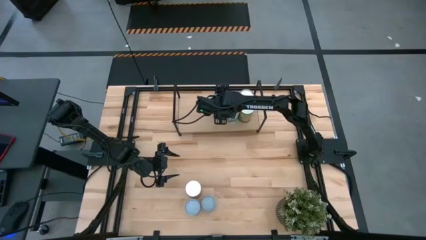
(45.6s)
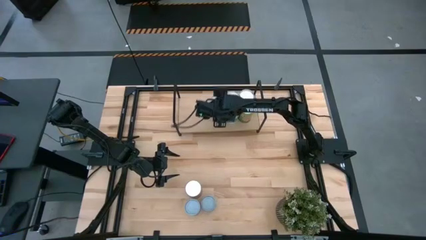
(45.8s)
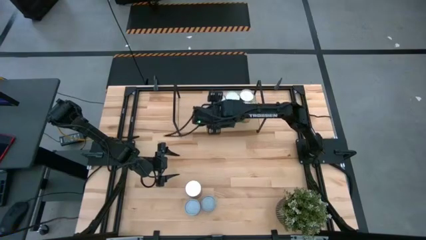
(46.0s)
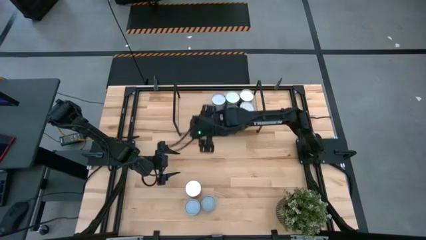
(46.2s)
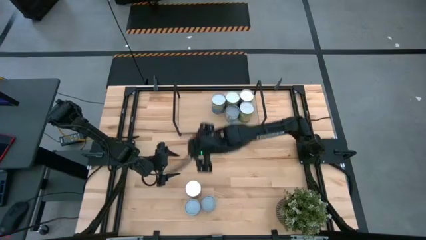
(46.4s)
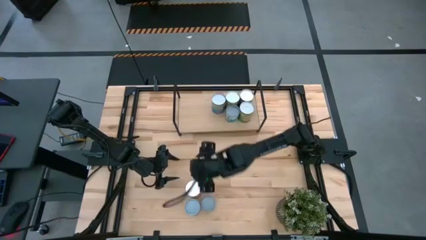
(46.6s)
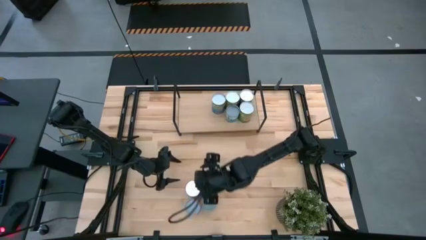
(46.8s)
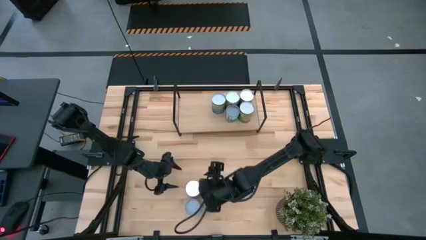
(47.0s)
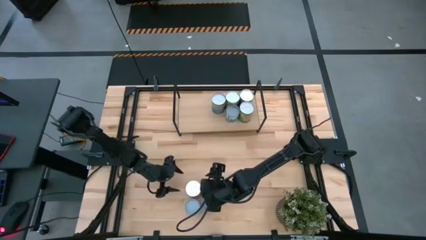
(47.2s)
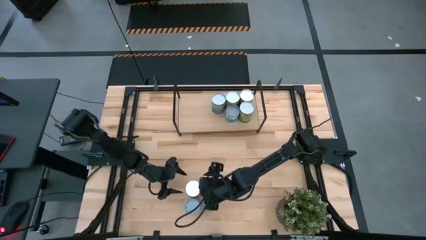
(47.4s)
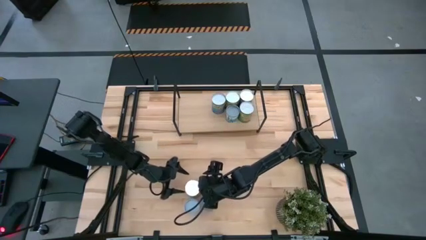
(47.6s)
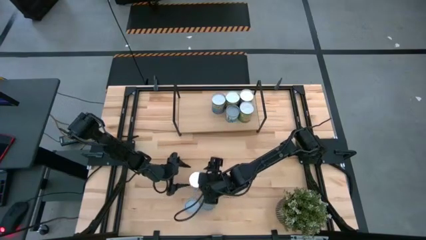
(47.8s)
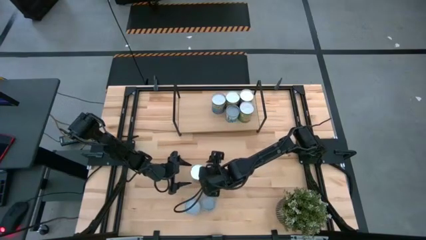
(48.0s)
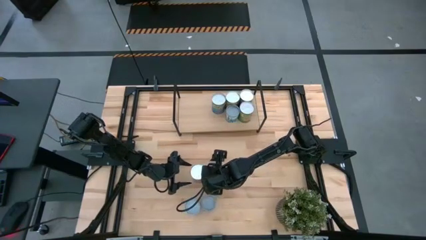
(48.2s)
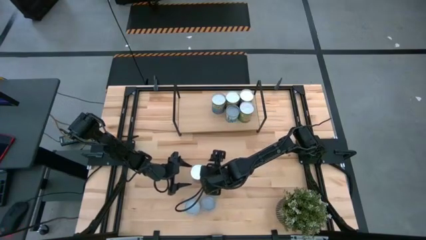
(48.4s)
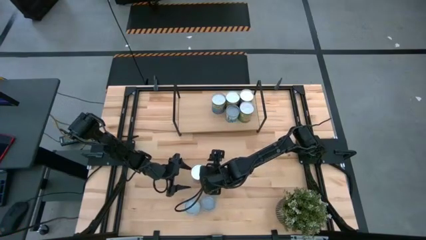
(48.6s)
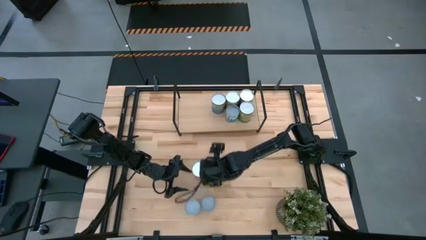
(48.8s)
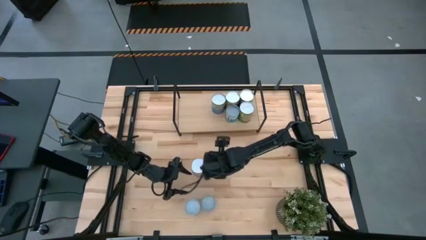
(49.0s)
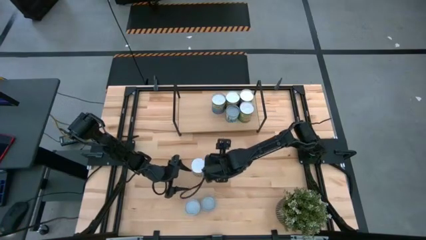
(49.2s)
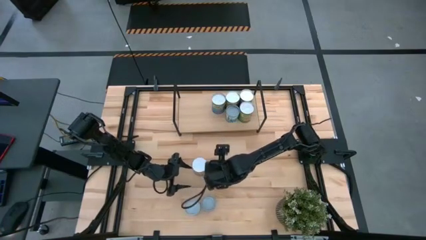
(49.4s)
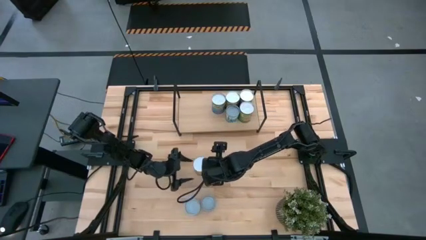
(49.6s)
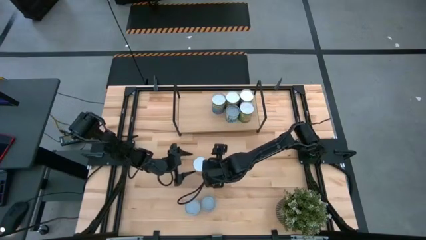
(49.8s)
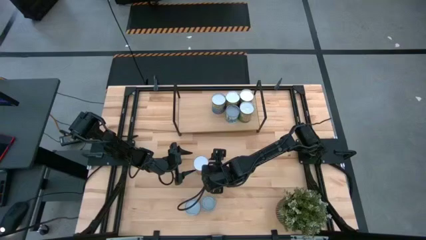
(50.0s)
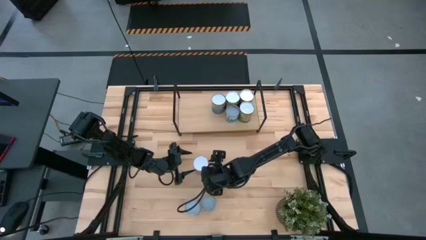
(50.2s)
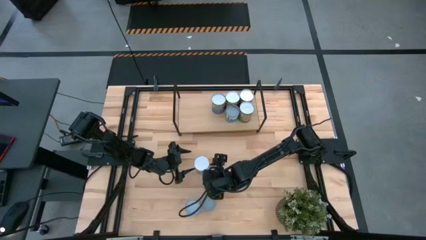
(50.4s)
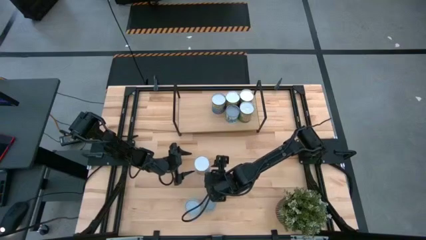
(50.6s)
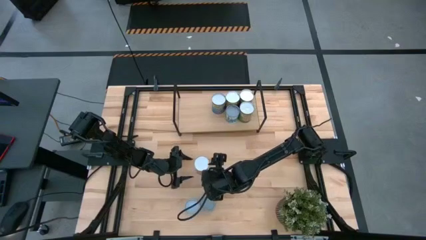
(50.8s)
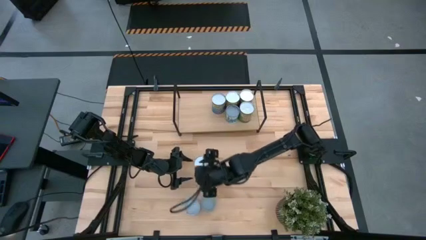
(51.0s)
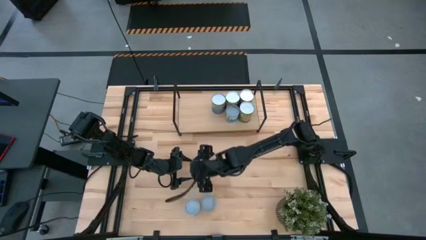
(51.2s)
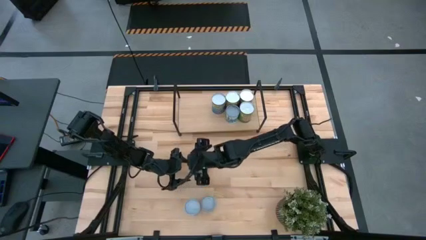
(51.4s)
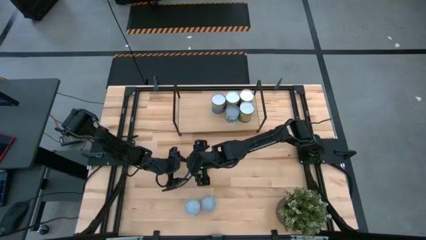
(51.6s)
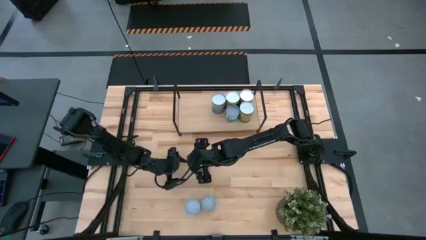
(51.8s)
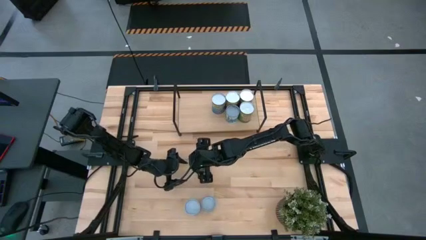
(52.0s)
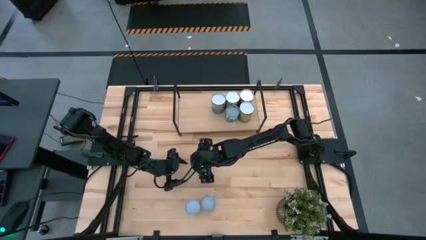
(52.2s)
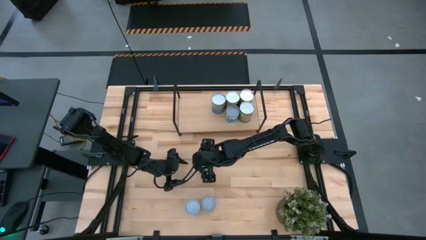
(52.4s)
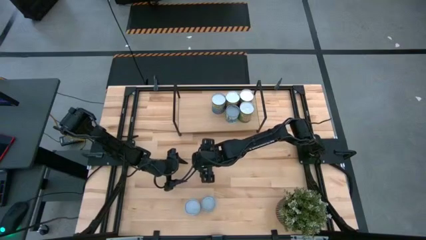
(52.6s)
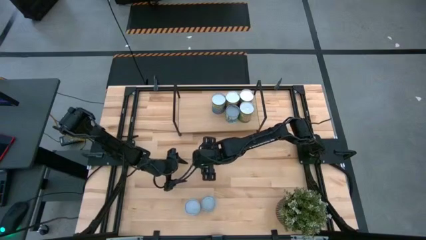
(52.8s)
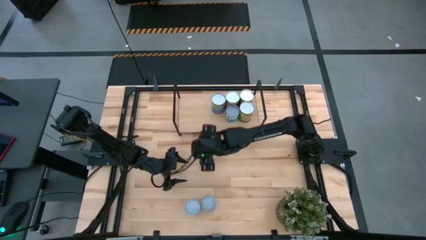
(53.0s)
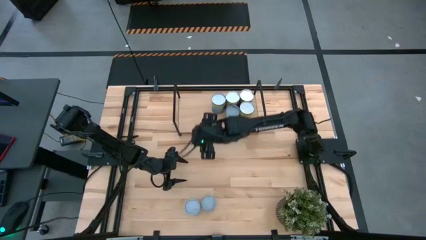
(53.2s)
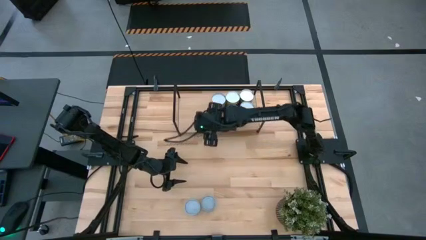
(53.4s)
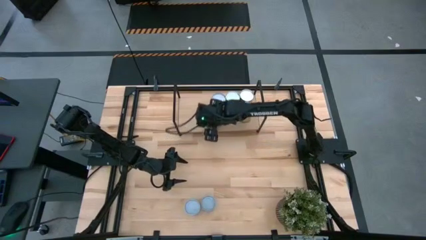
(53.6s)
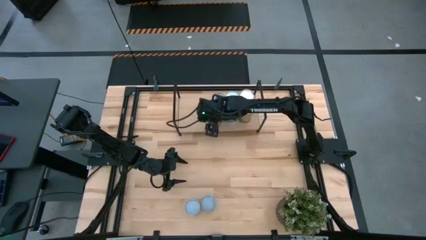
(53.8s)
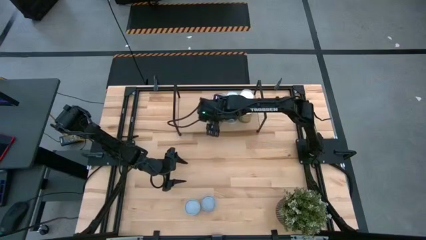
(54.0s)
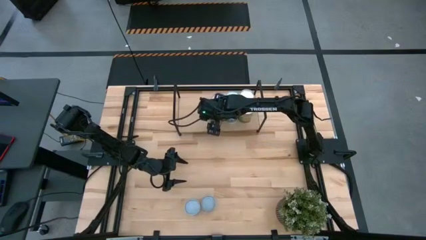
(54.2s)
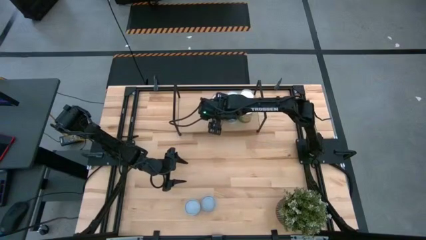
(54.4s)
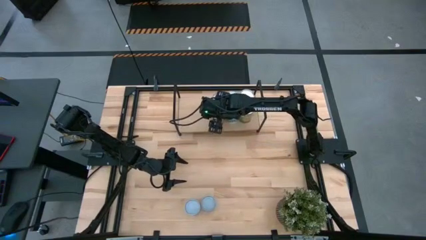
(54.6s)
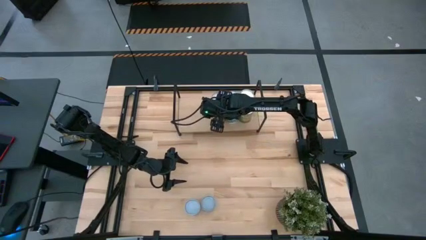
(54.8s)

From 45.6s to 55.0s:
Task: Pick and place cans onto a shelf
Put the canned pineapple on the shelf

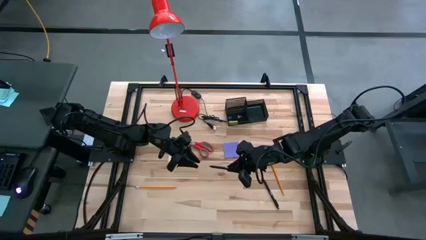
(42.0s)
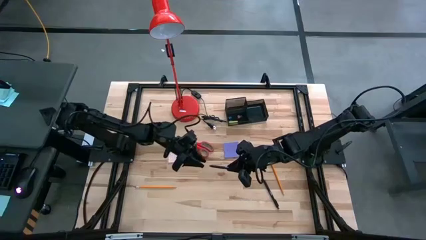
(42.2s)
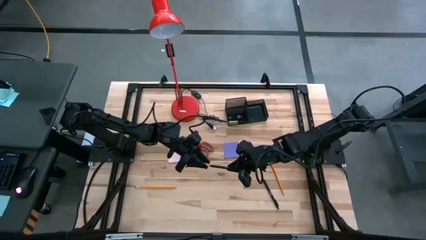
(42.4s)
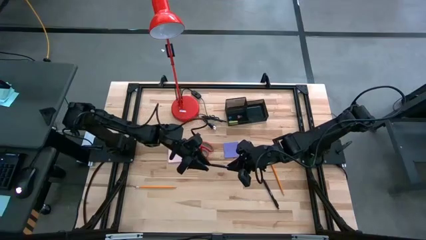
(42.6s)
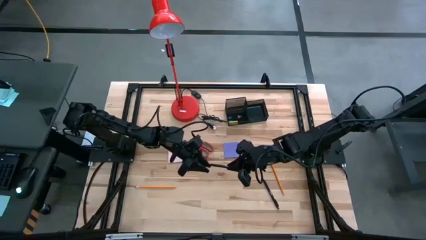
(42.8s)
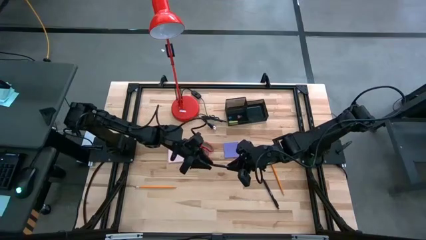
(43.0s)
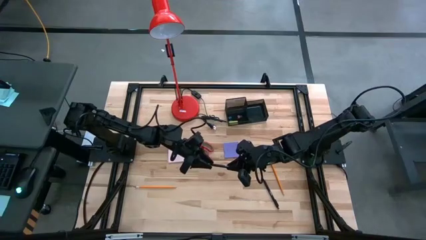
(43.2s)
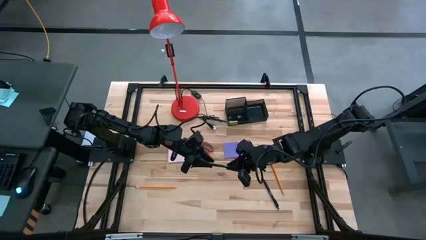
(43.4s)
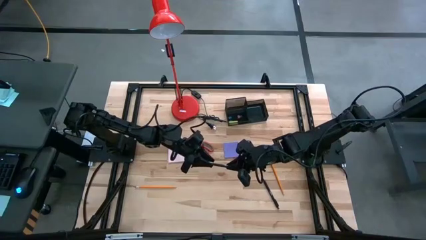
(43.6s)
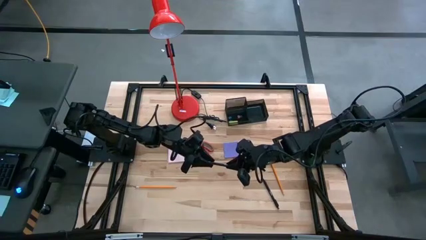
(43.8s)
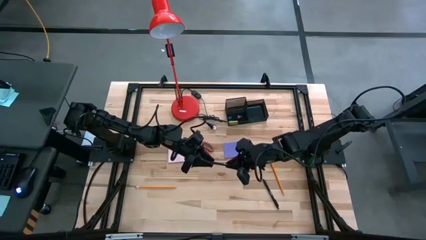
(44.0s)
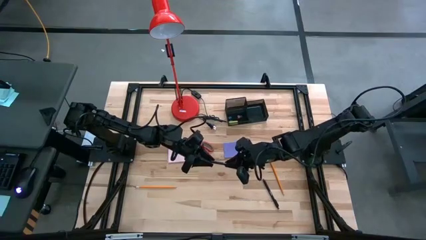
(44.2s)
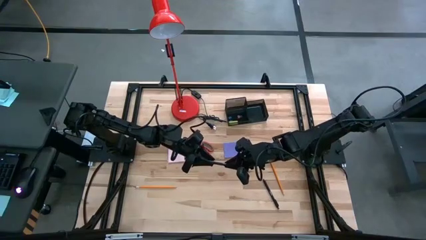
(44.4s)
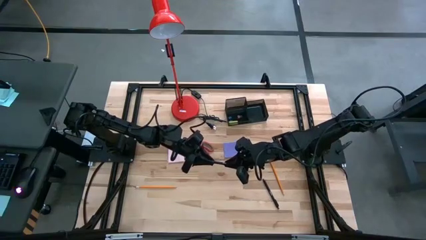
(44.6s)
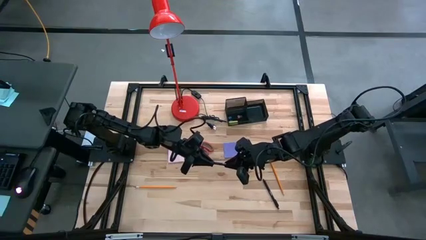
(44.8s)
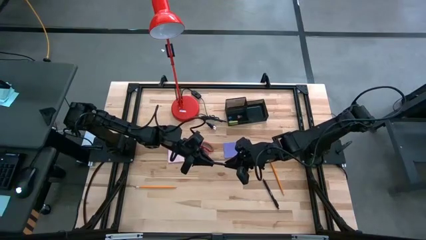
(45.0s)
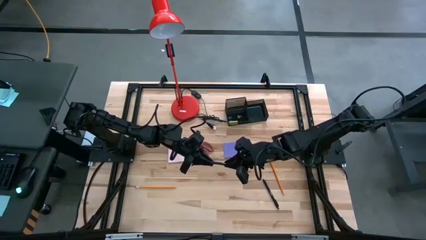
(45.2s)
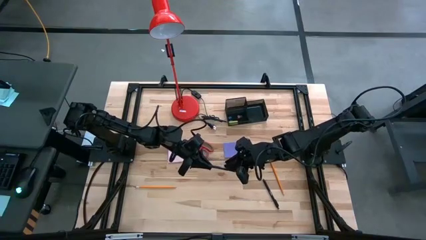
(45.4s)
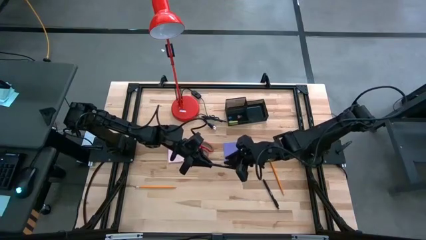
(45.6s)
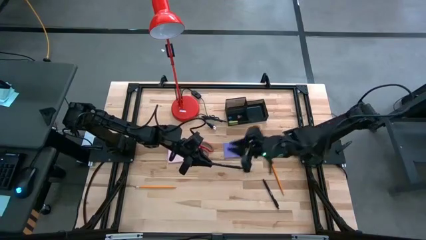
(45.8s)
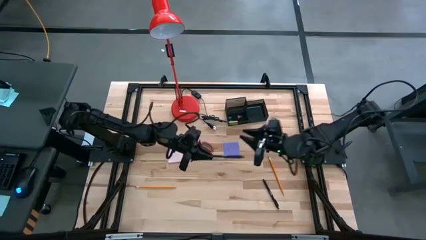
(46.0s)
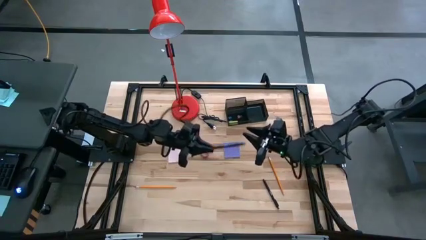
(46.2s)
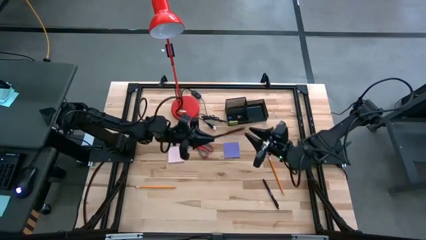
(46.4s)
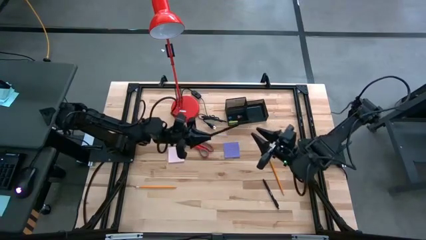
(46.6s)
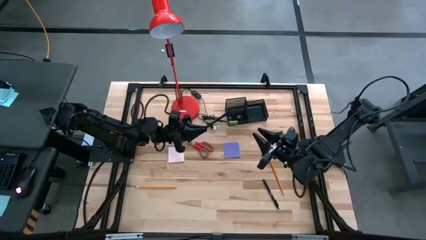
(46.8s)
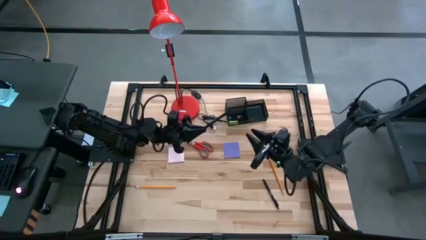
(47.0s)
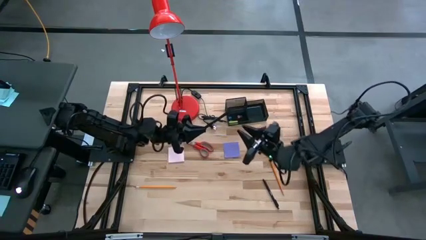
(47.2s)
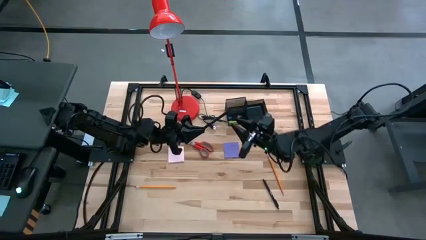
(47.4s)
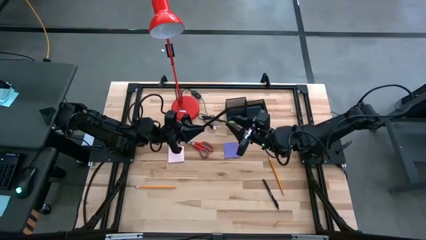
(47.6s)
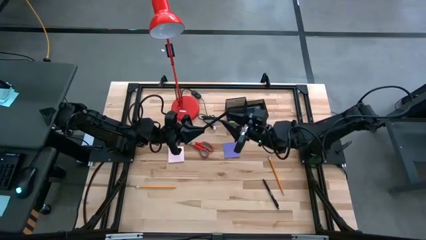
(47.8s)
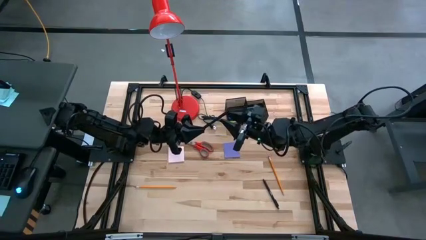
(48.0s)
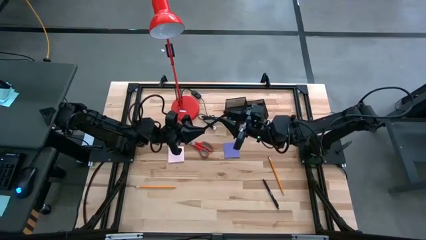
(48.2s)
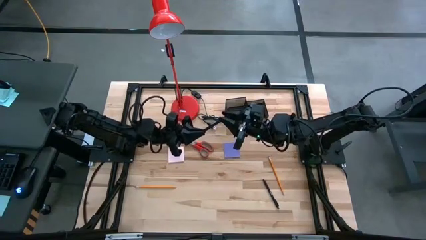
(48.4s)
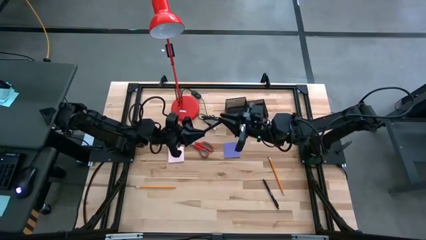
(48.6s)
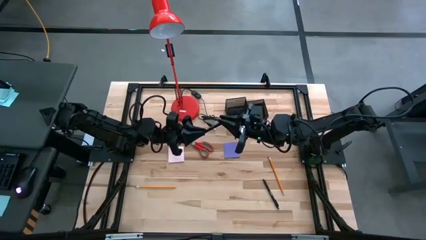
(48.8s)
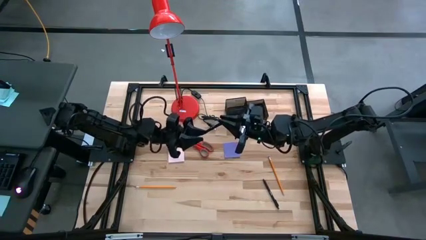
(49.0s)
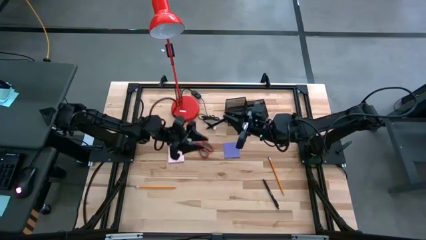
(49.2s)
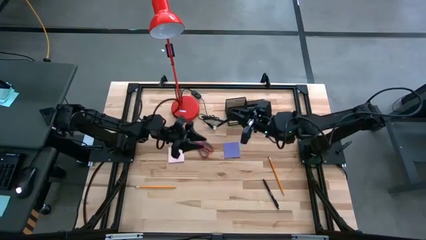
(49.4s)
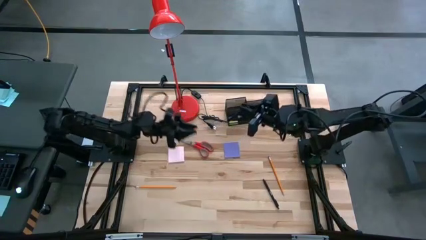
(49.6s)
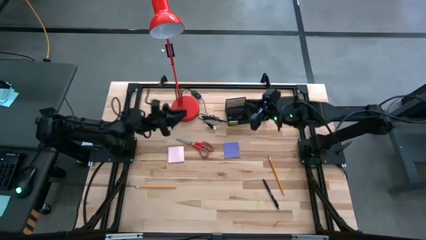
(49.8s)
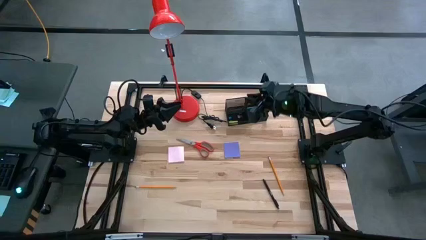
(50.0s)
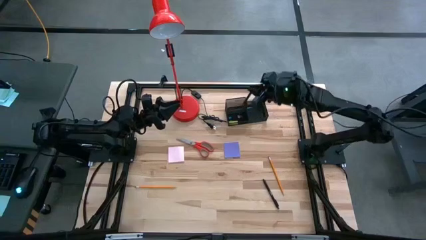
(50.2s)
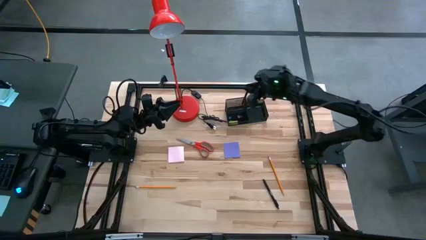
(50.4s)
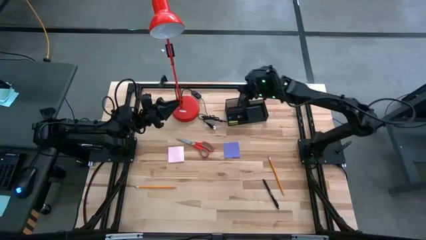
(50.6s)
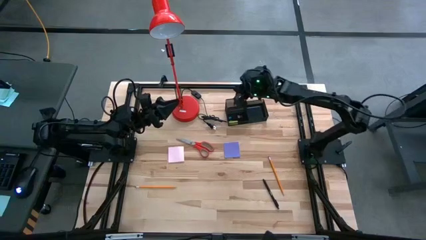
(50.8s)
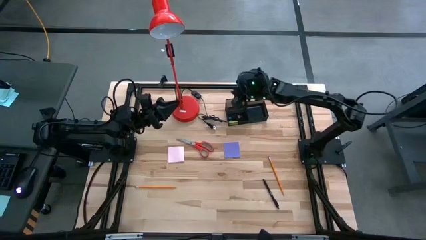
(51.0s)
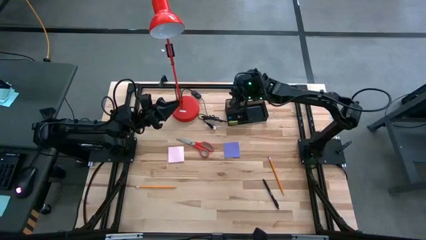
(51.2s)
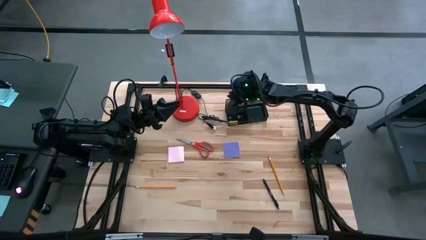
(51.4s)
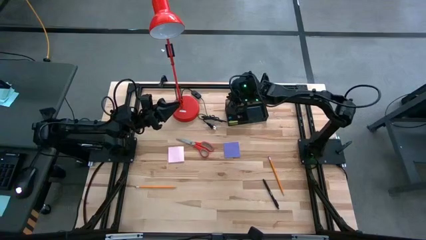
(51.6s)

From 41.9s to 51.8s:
Task: Pick and place office supplies into organizer
Put the left black pen into the black desk organizer
